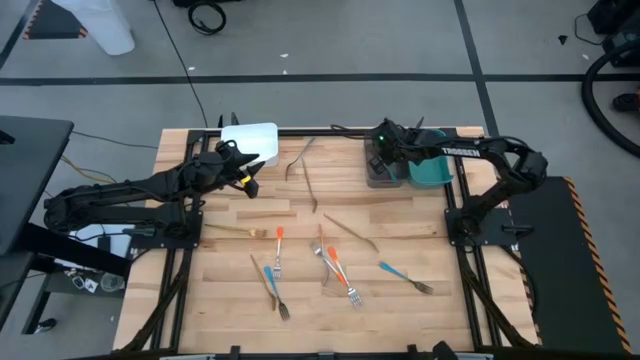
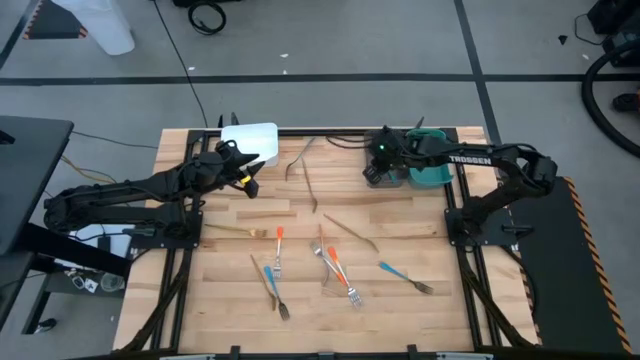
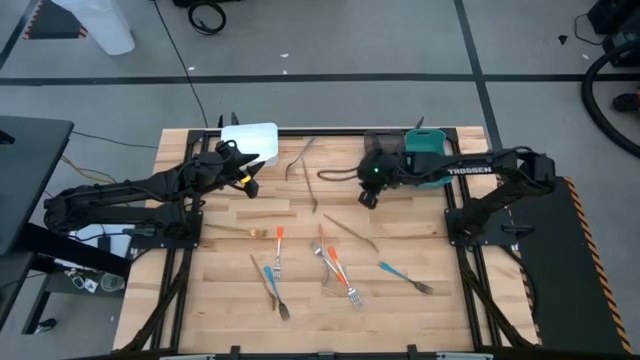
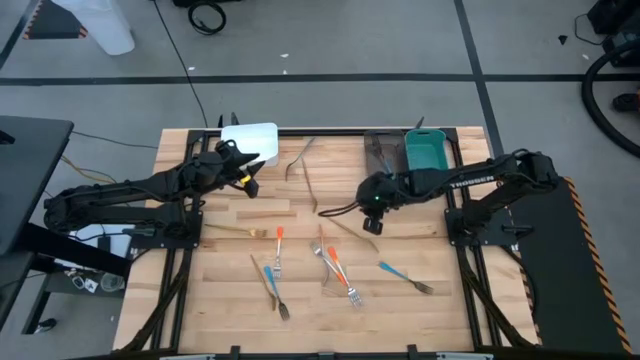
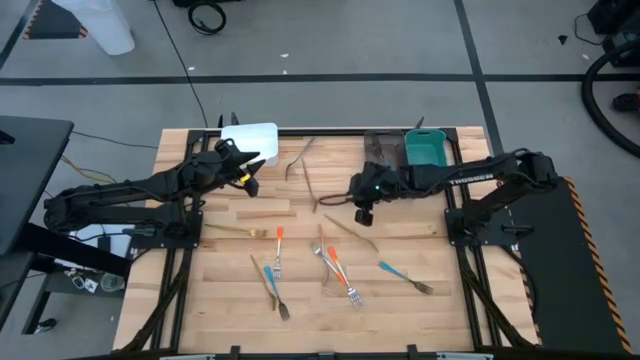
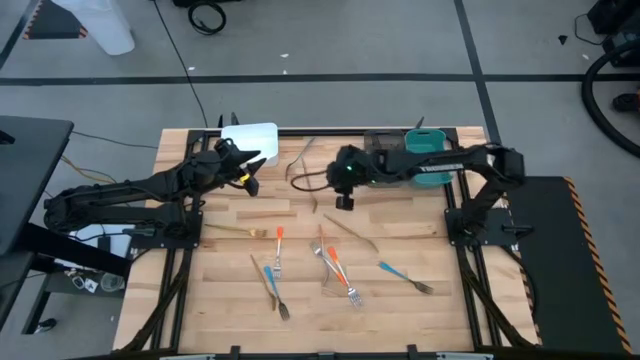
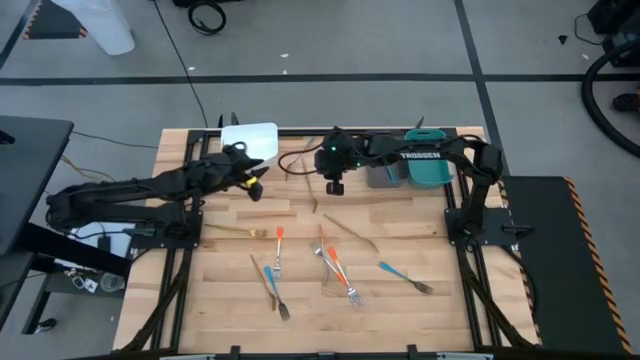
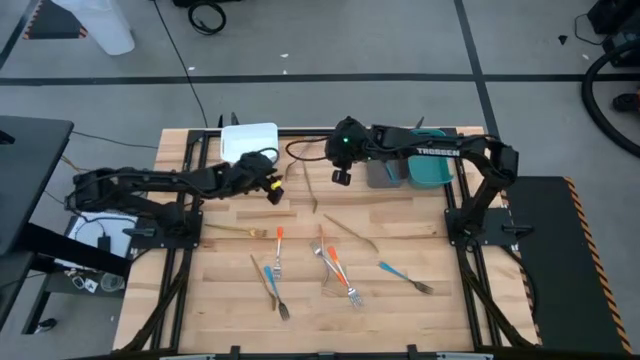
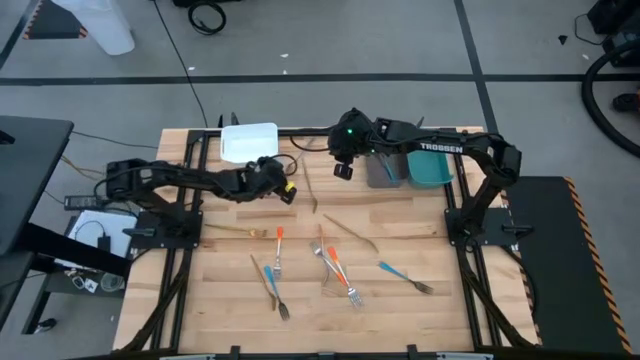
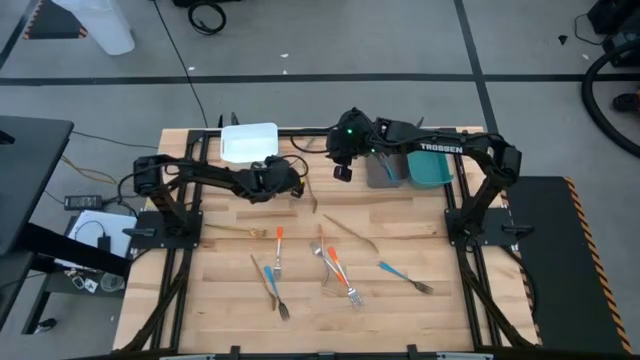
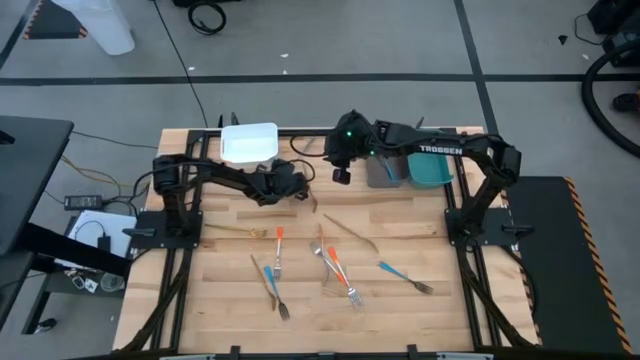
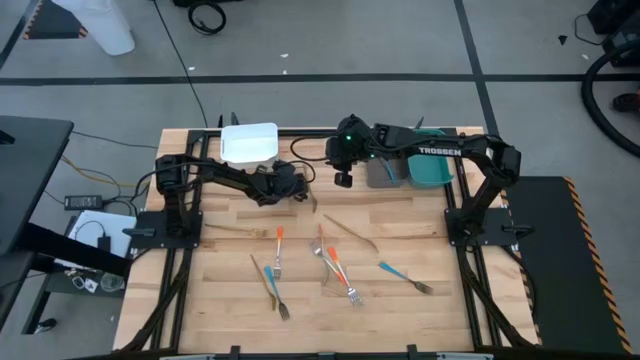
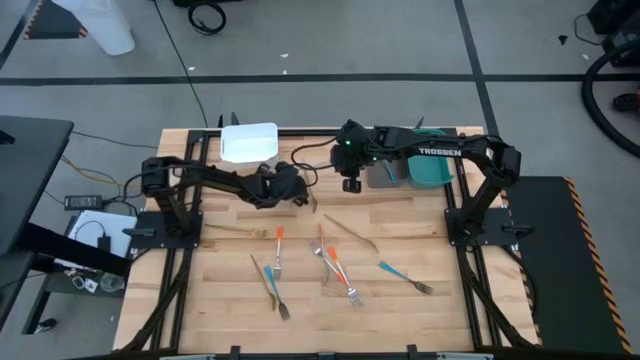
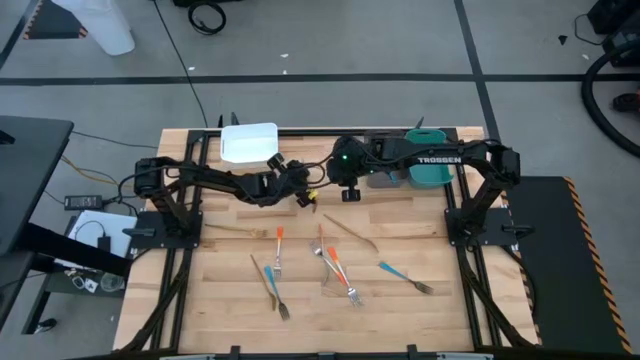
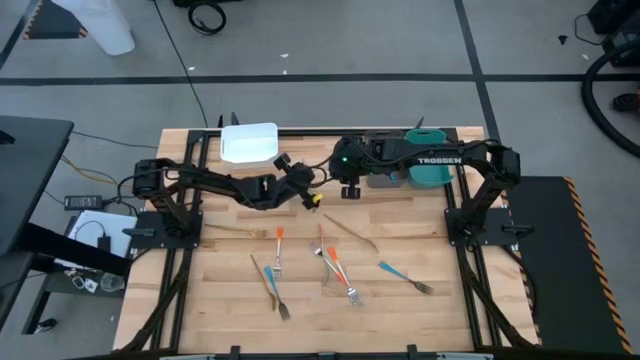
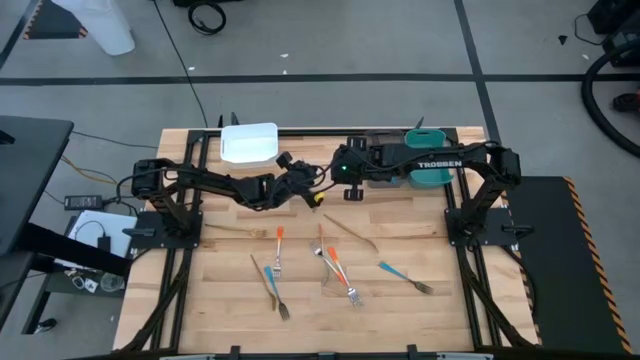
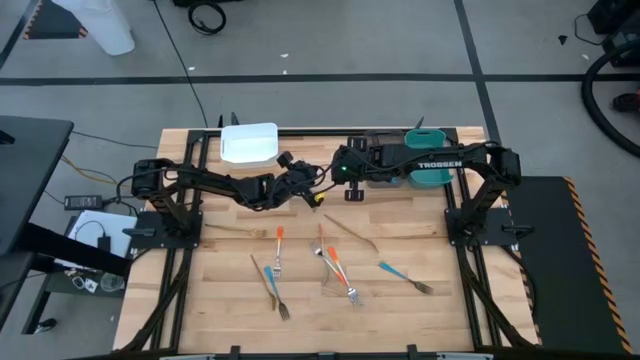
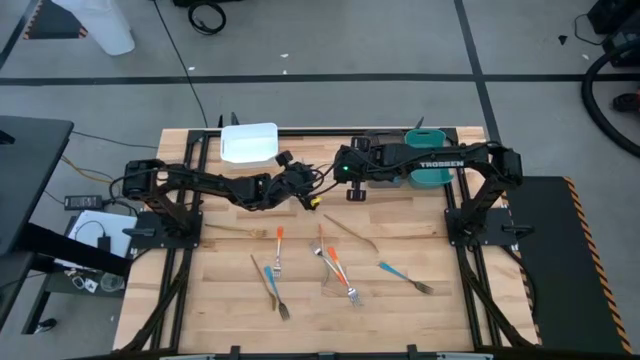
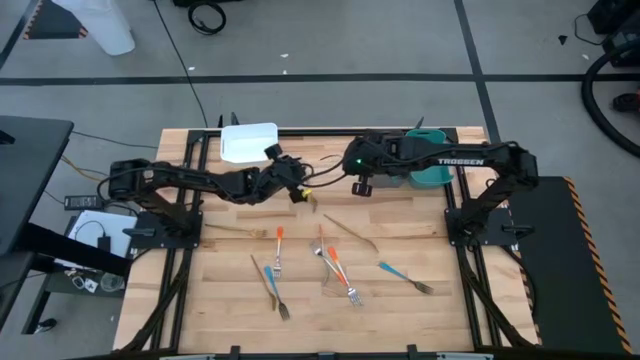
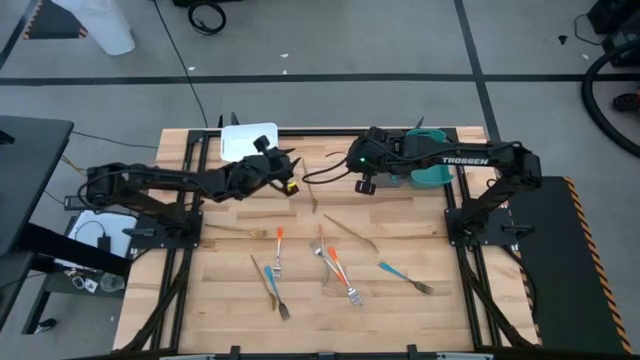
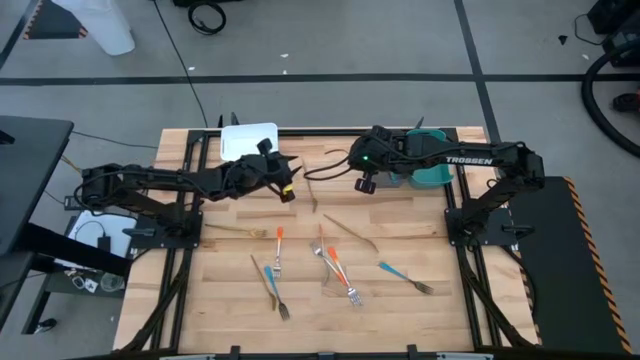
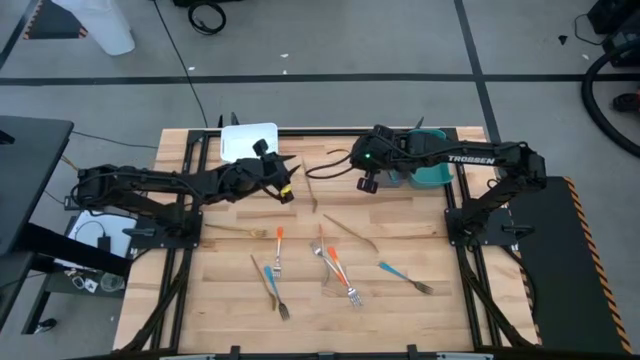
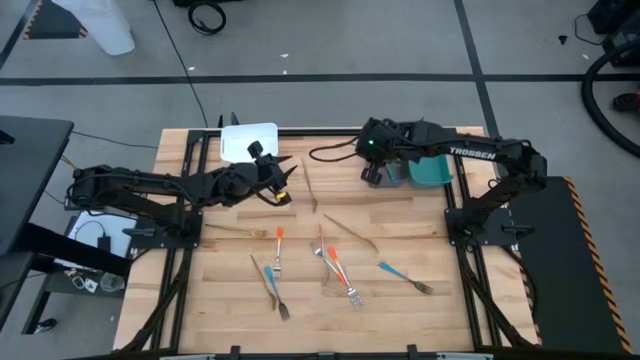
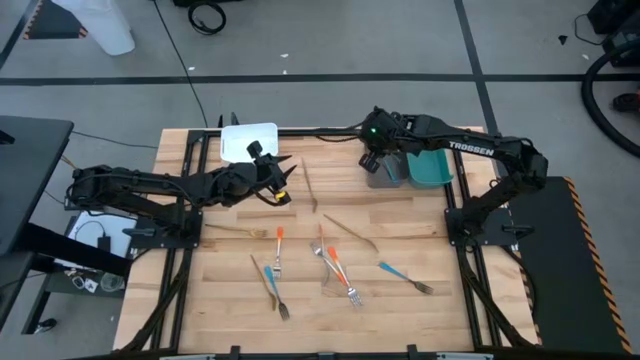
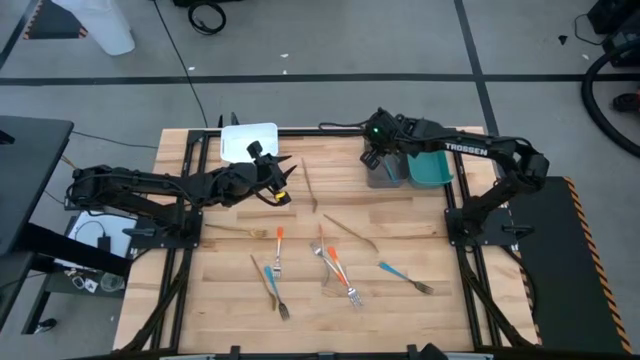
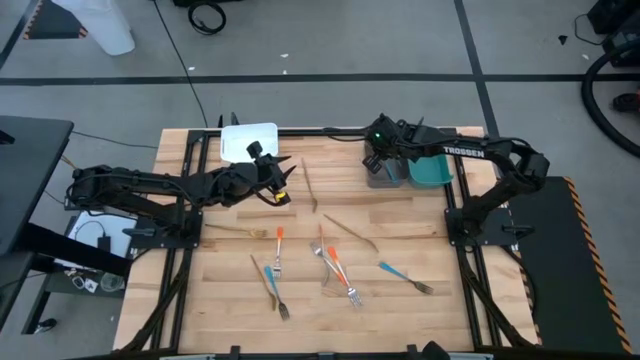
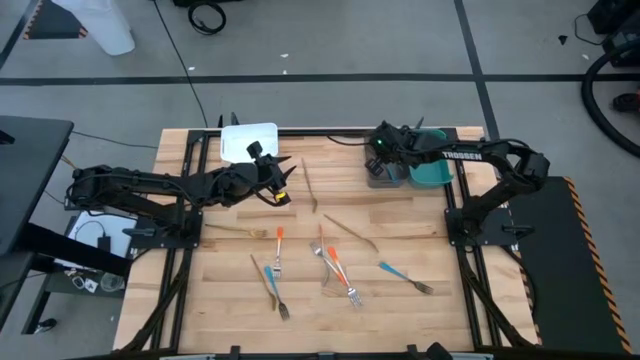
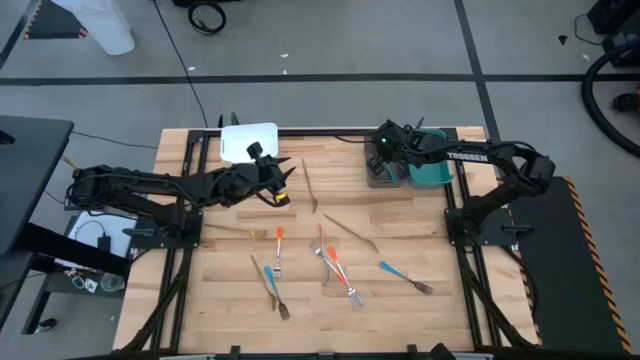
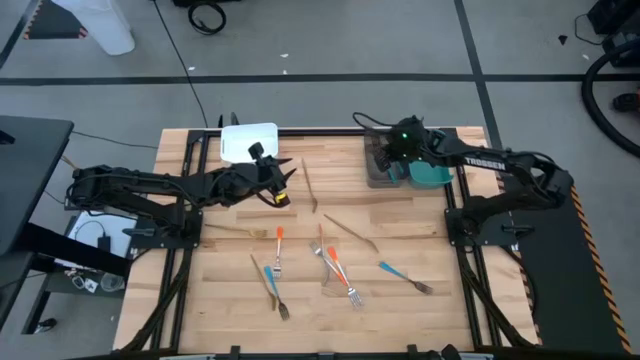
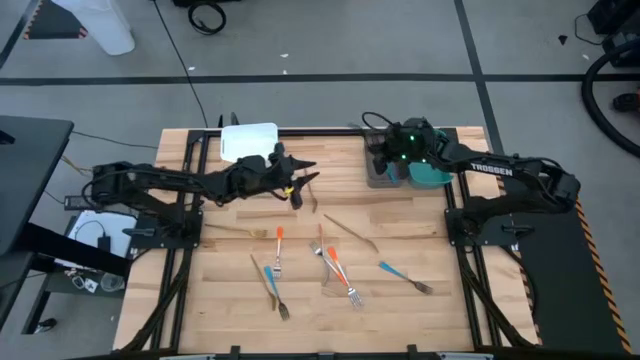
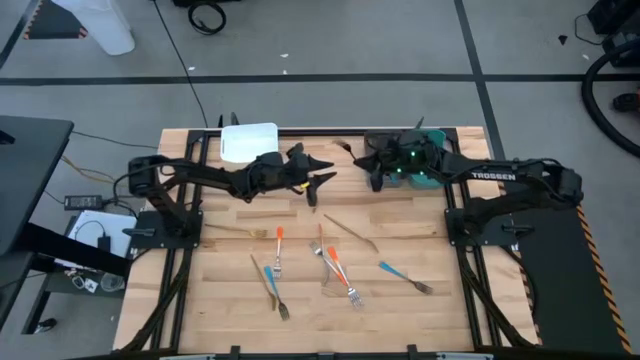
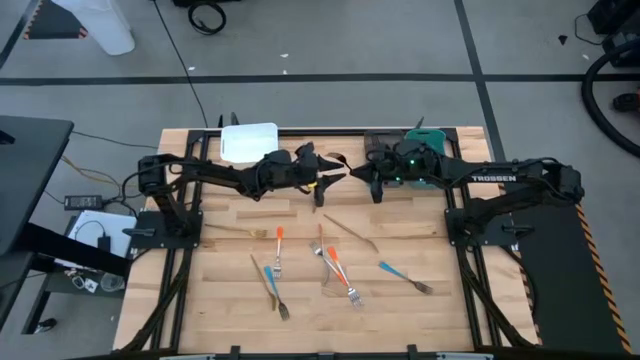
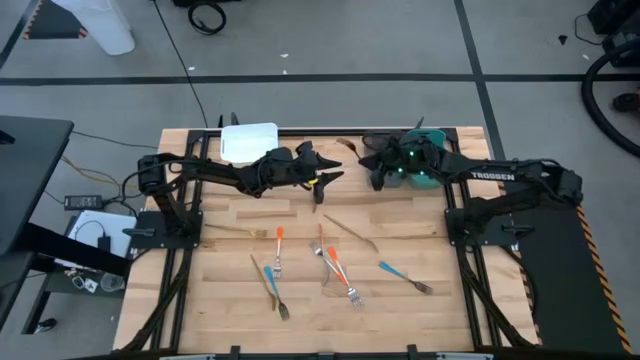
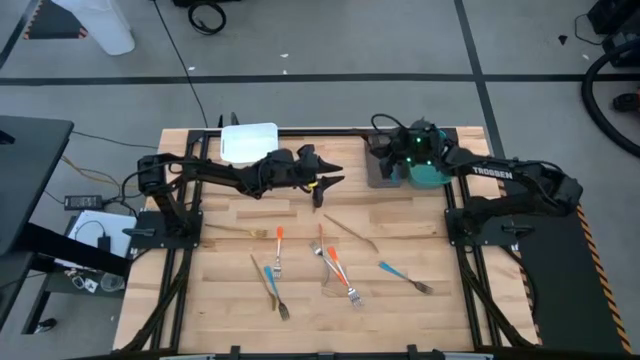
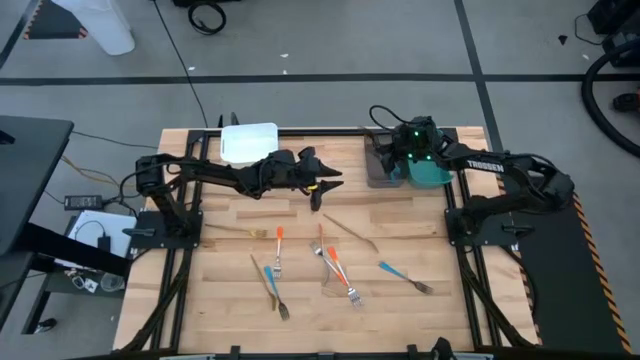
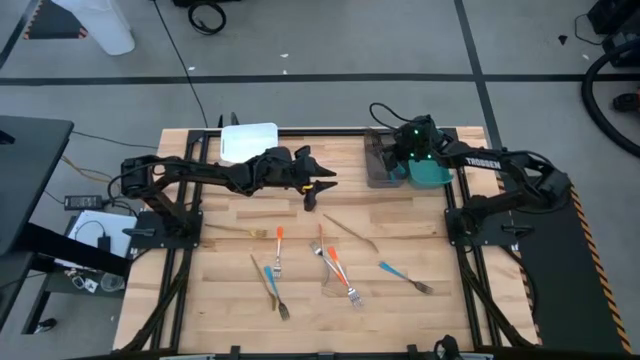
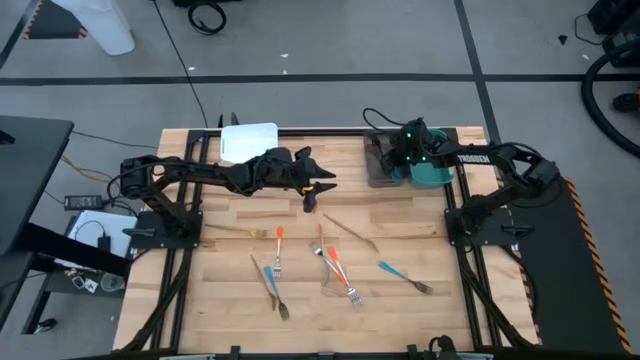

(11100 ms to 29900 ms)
Task: Sort silverware by color (type)
Put the top center blue fork into the black bin

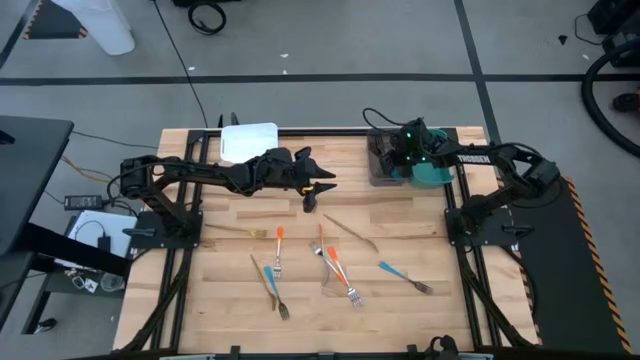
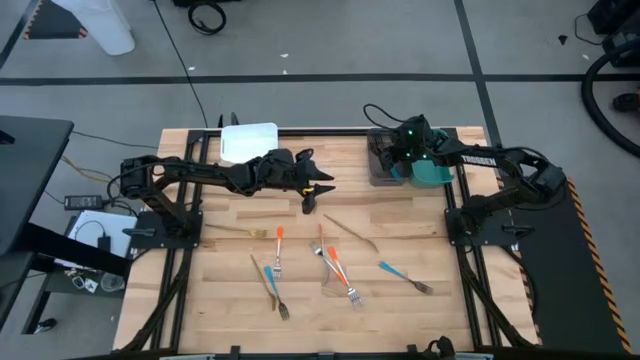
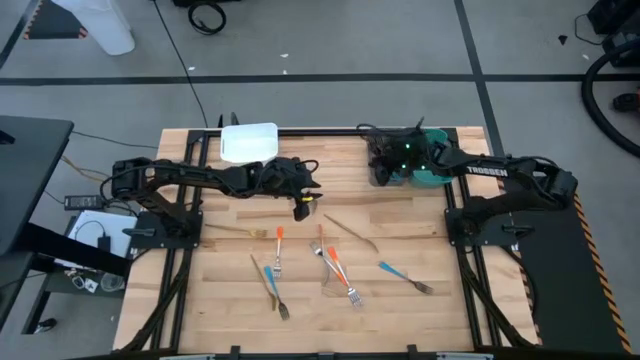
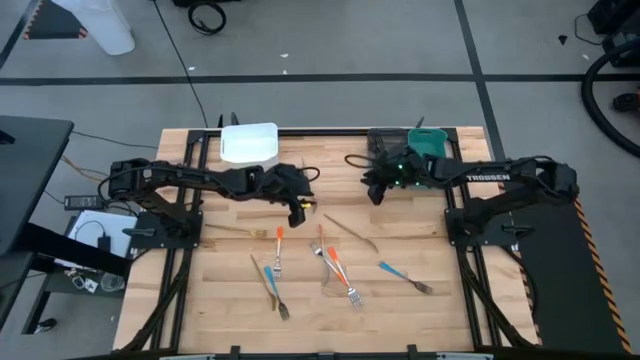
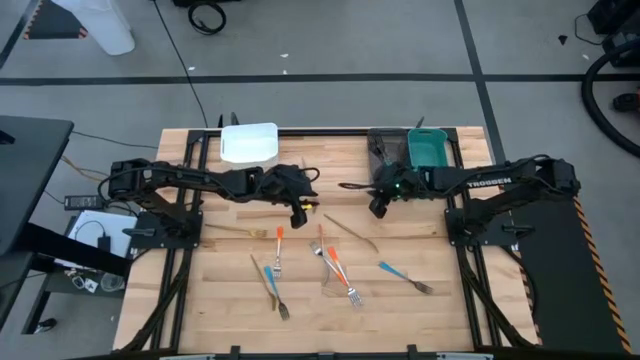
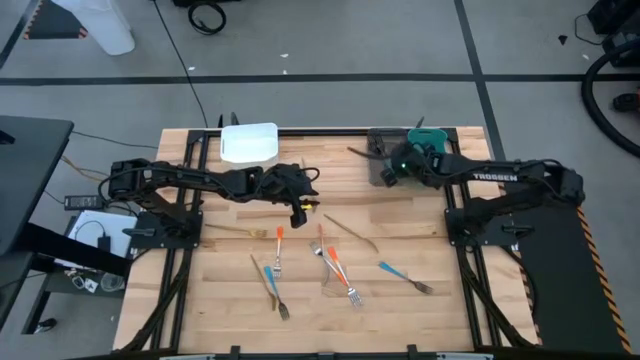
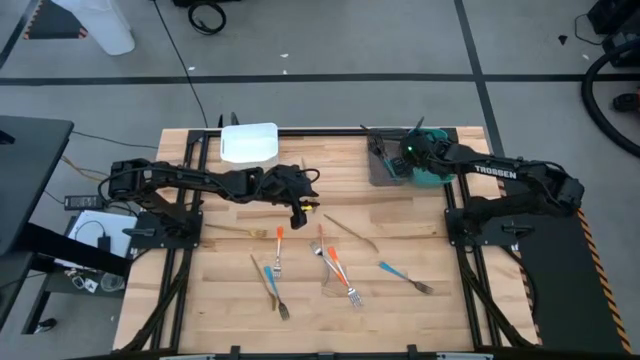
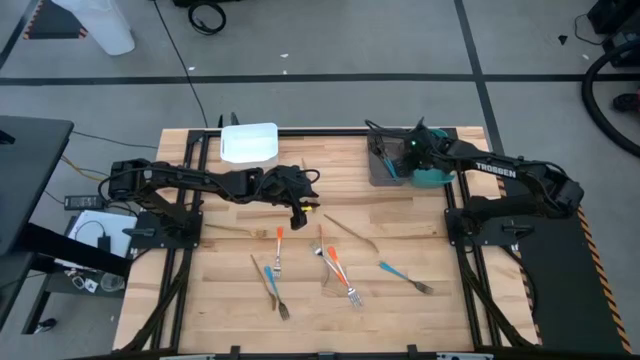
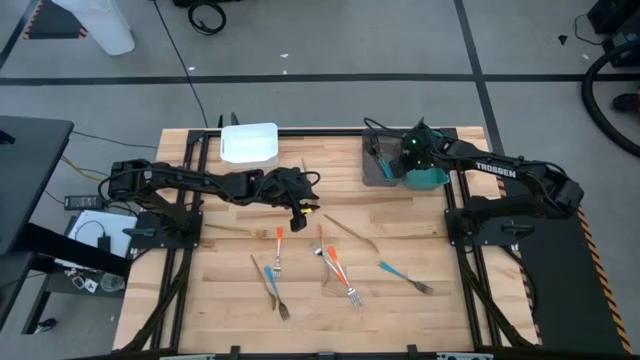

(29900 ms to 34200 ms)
Adjust the black and green bin
